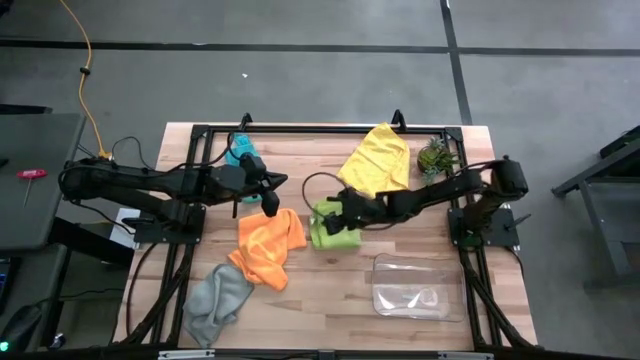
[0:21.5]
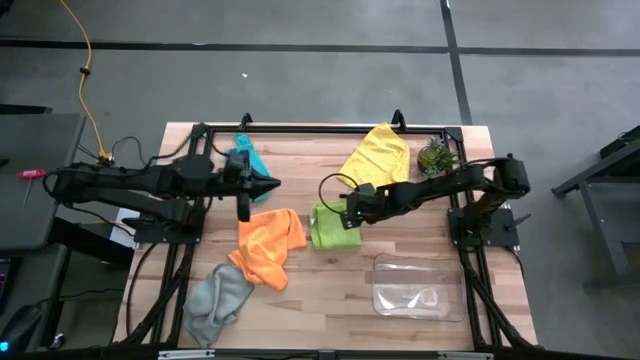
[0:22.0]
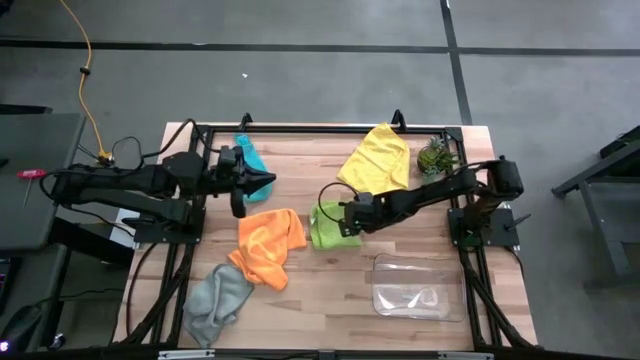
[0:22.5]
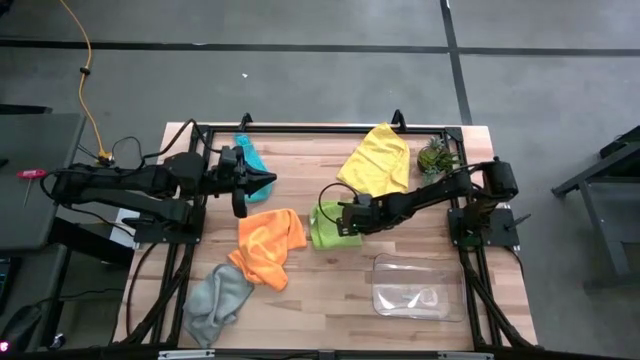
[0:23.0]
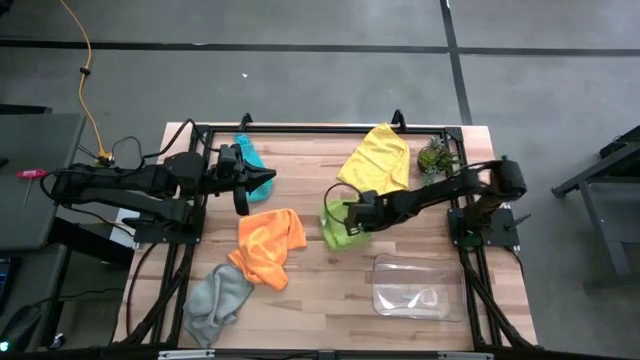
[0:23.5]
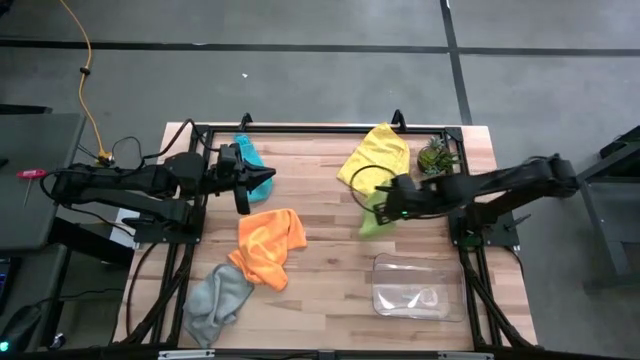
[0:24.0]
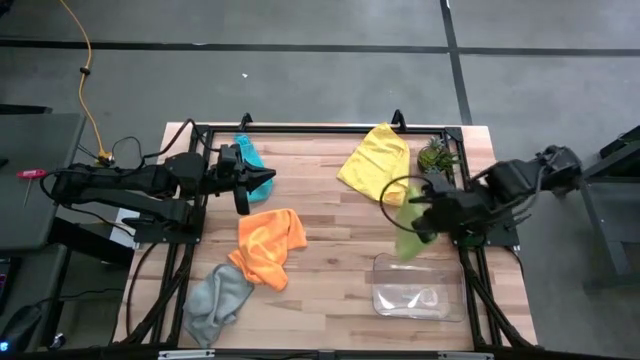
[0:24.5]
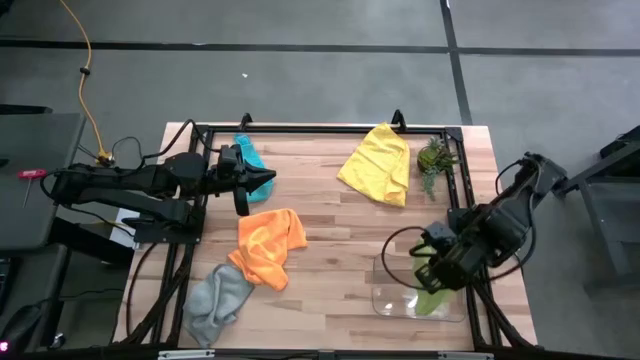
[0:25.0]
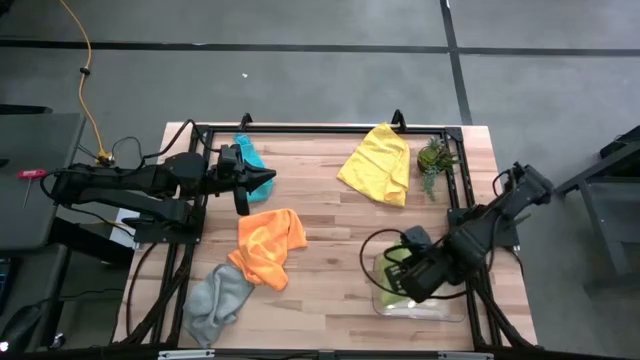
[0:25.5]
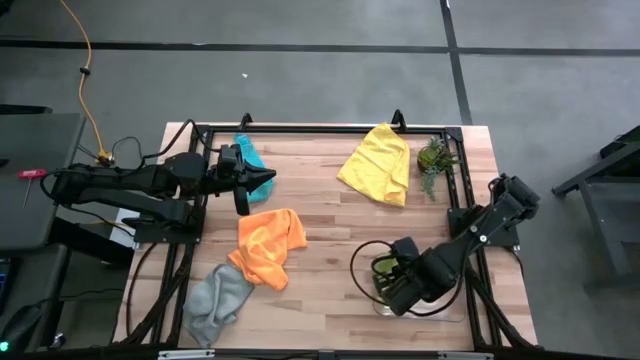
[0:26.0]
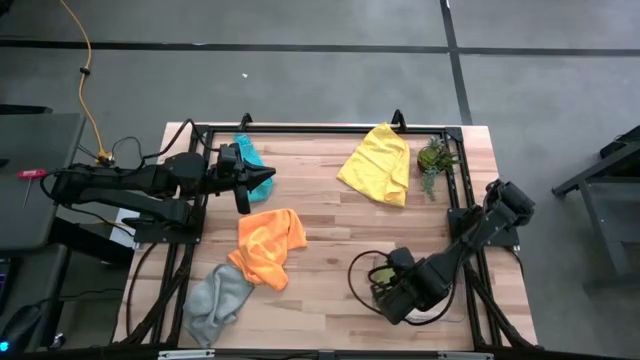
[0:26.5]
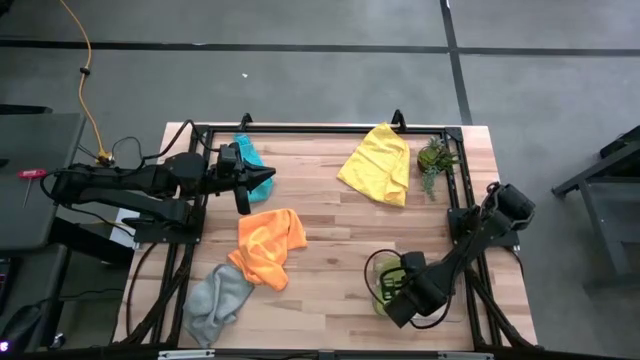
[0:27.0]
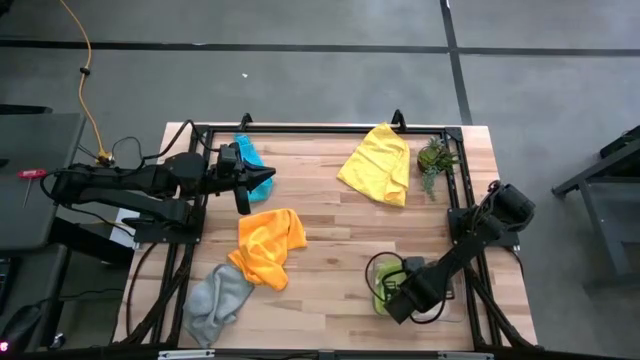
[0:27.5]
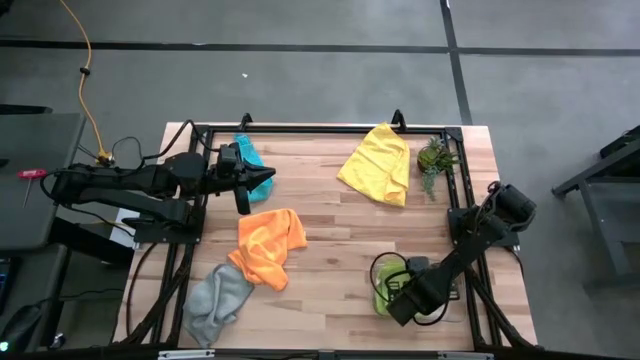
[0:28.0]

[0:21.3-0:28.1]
Task: Fold microfiber towels
Put the green microfiber cloth into the transparent bin

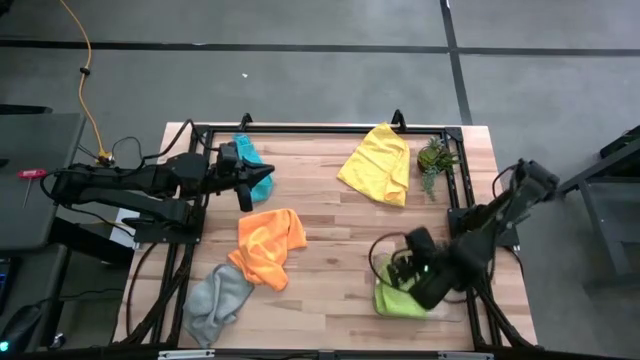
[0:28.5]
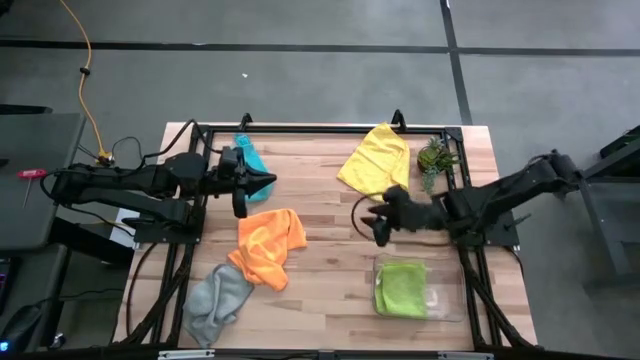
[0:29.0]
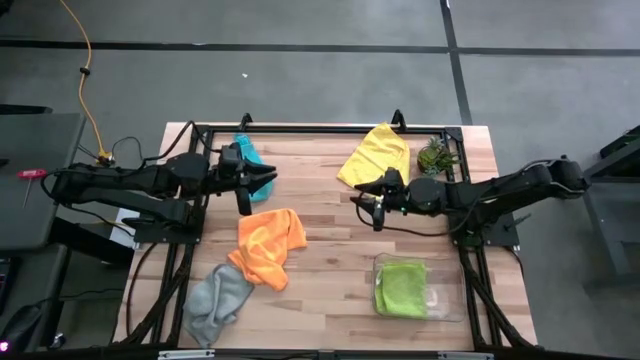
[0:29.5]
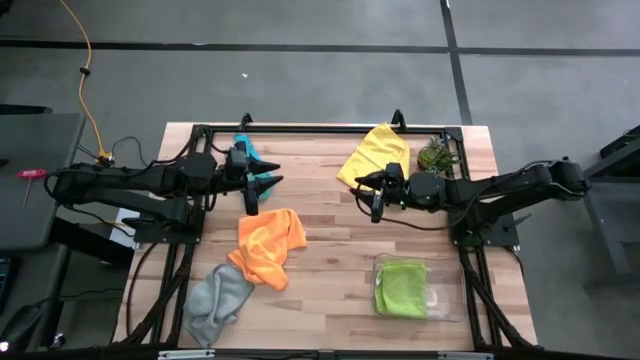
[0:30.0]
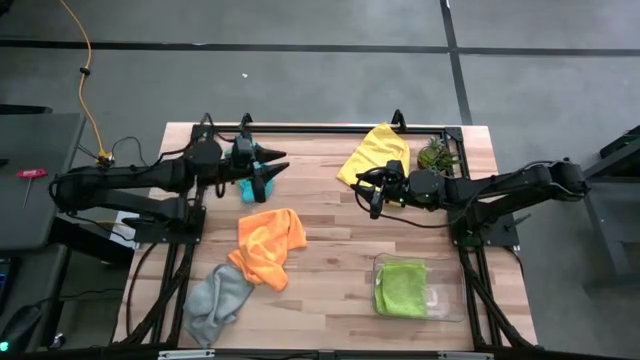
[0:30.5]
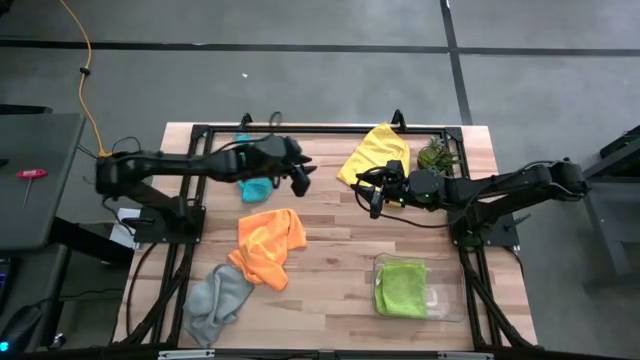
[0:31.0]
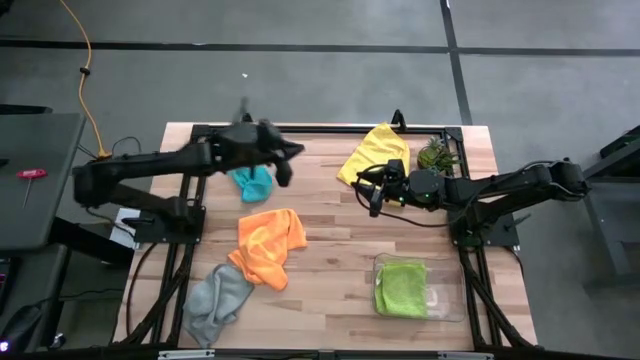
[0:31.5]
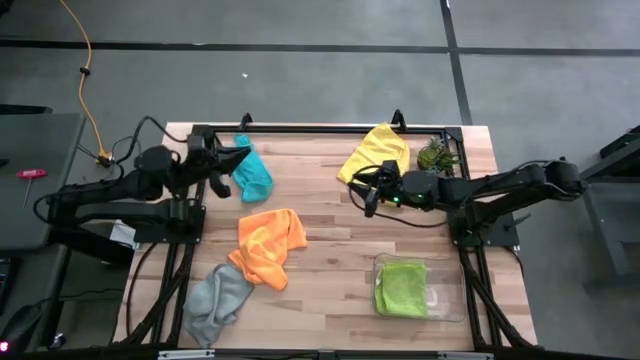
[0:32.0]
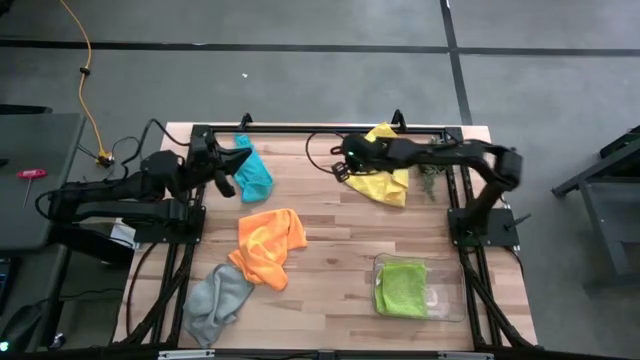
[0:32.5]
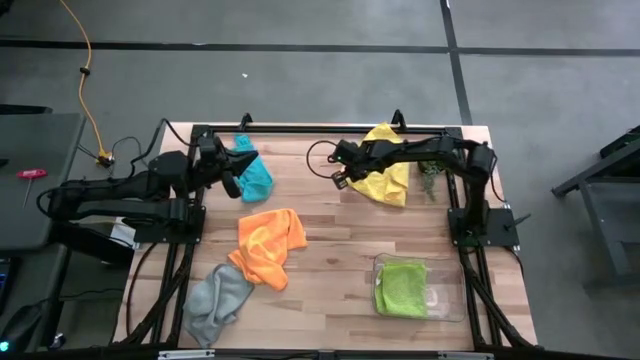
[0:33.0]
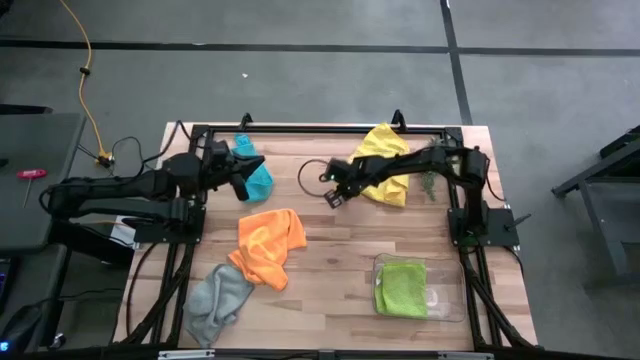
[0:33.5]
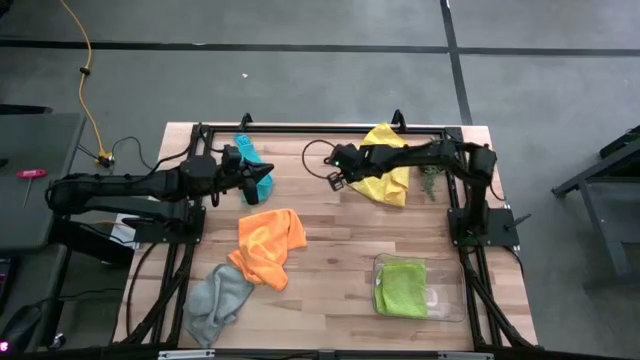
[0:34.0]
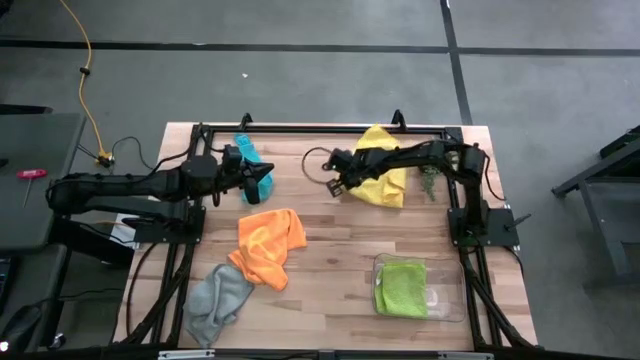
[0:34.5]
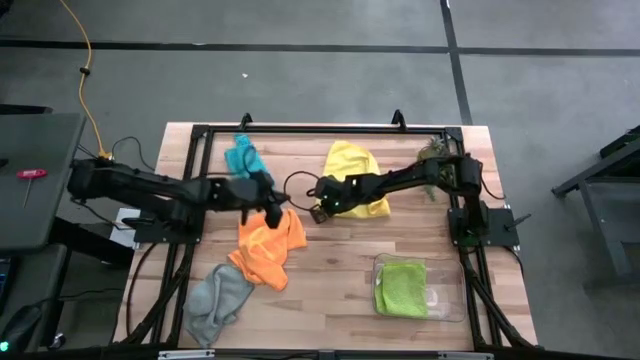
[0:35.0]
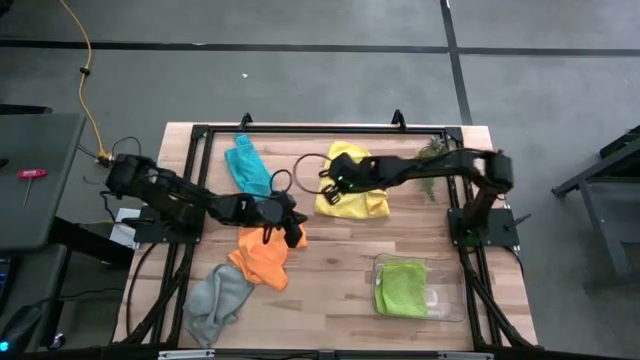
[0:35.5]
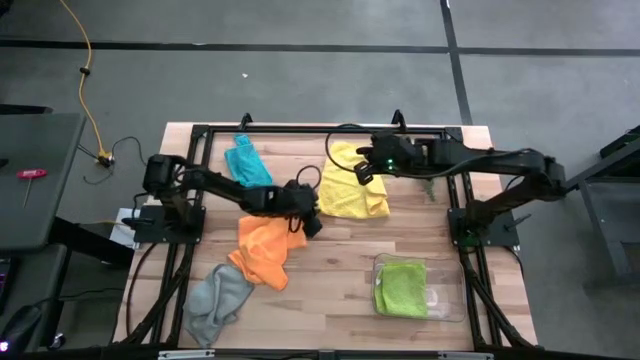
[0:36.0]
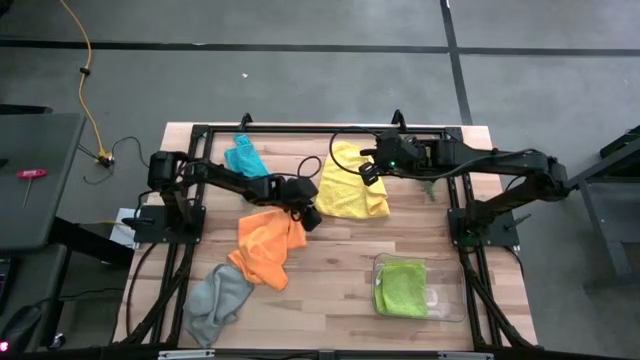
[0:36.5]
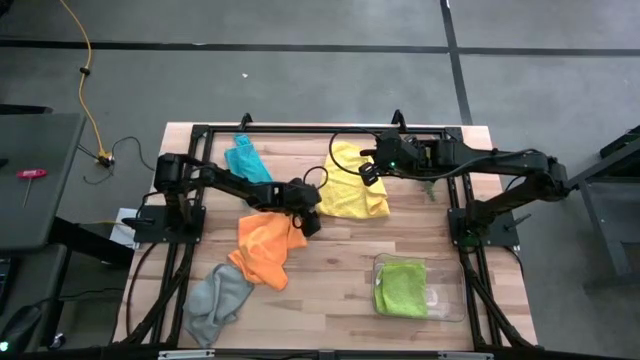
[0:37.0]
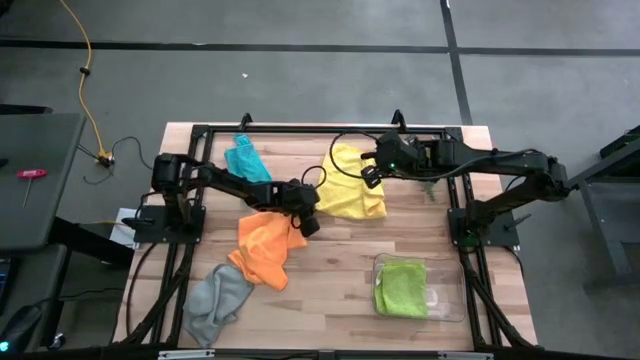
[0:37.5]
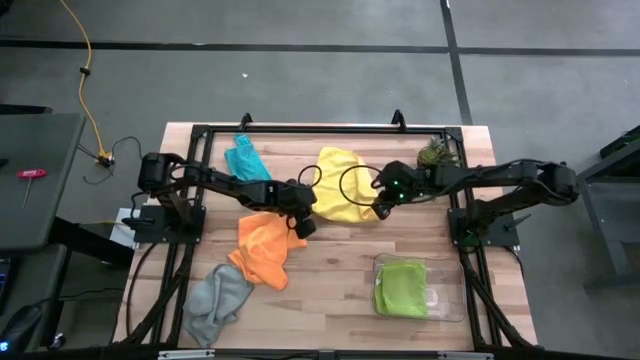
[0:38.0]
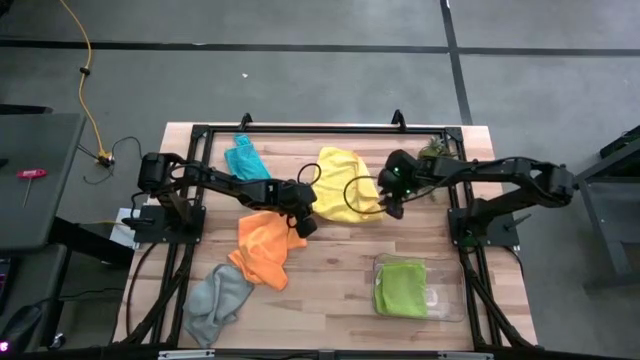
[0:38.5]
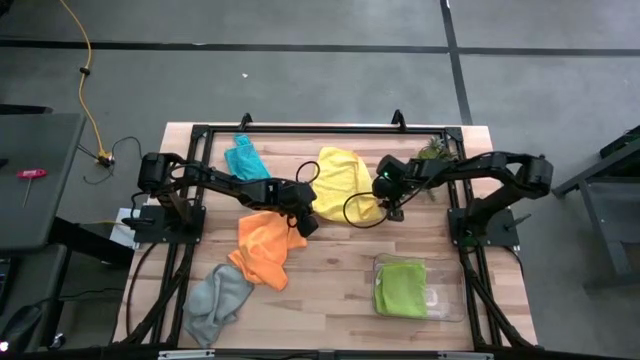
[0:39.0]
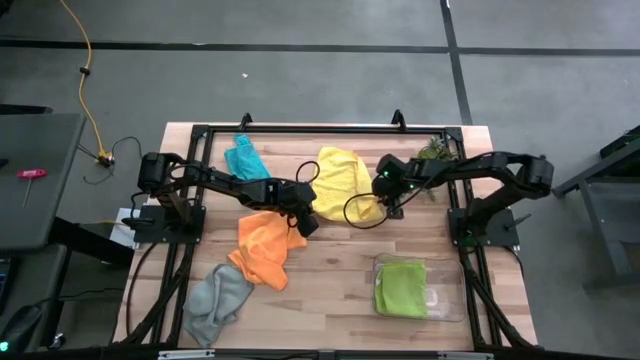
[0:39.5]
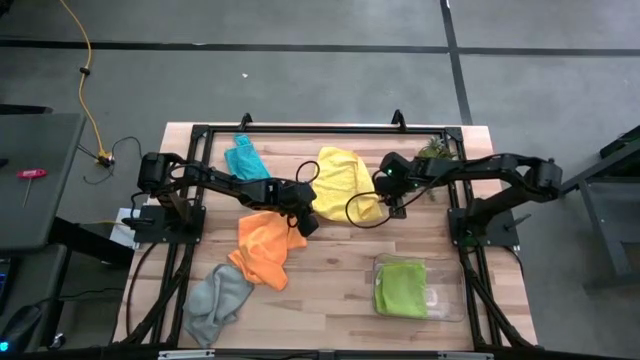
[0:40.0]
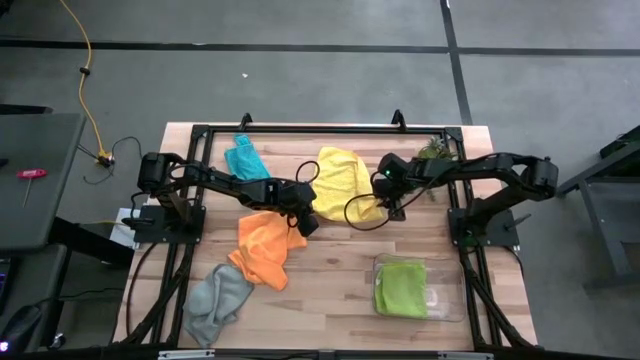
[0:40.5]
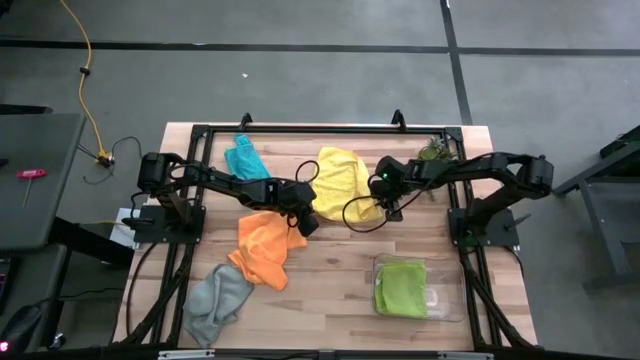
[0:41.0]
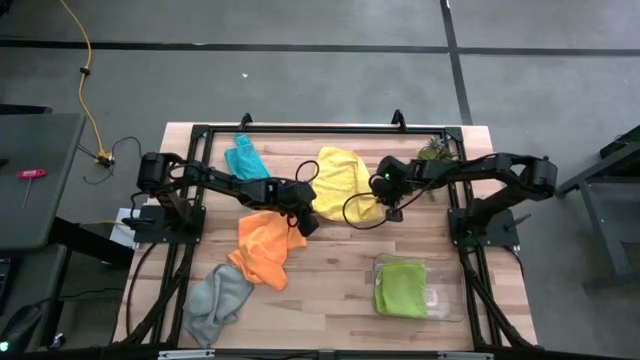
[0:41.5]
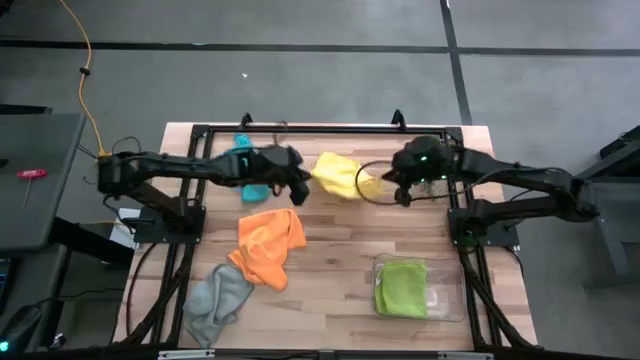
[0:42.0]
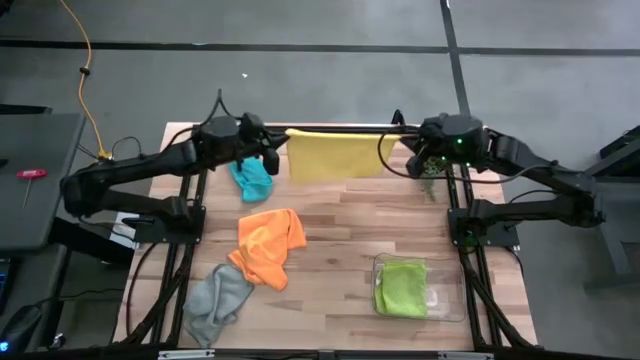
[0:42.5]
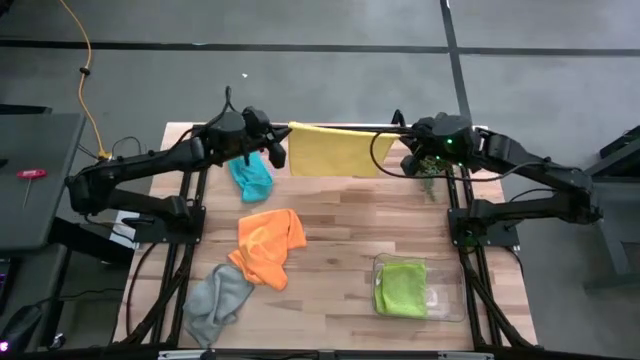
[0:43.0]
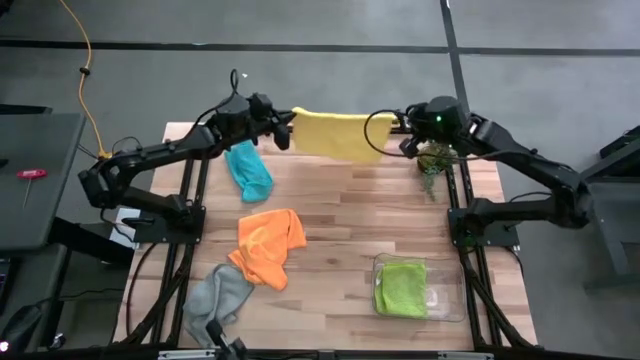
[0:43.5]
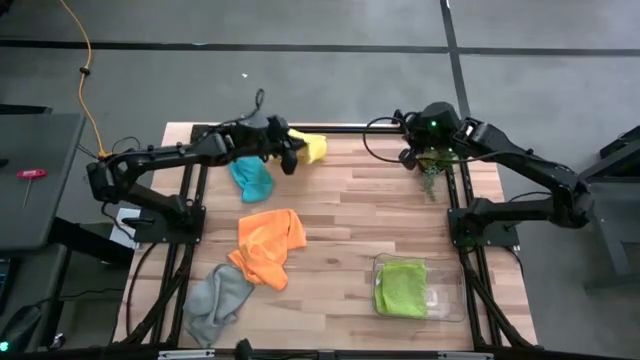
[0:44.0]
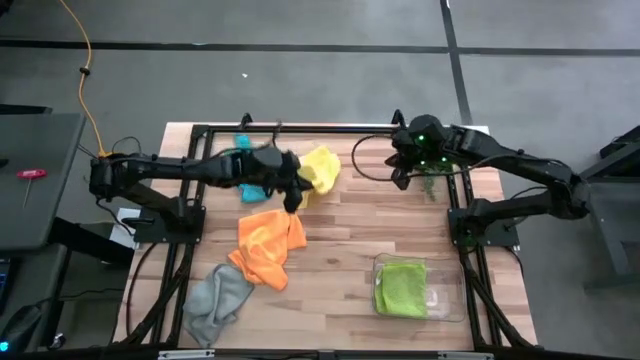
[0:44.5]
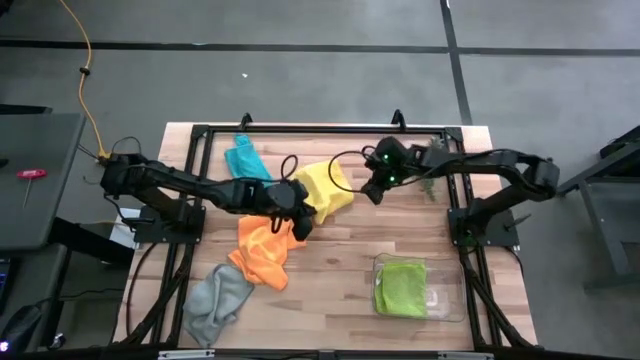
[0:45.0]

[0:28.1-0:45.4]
Fold the yellow microfiber cloth
